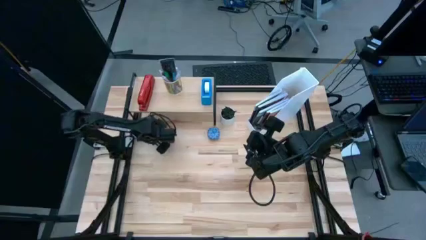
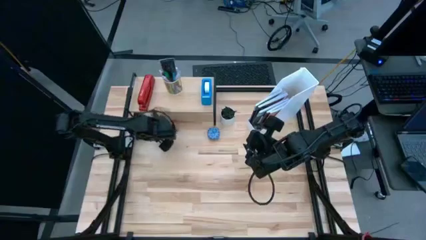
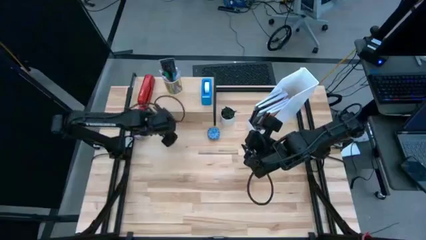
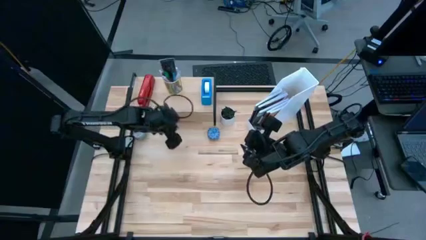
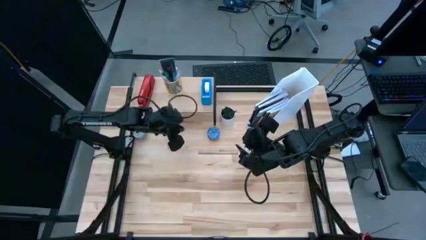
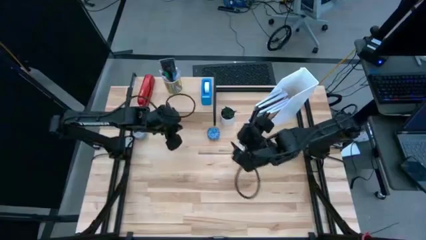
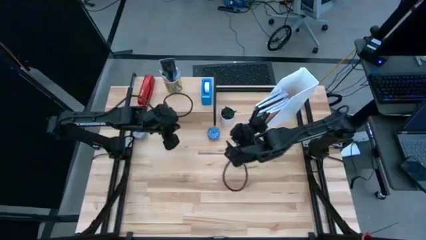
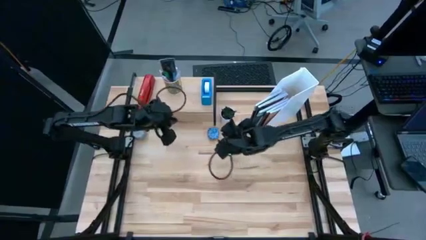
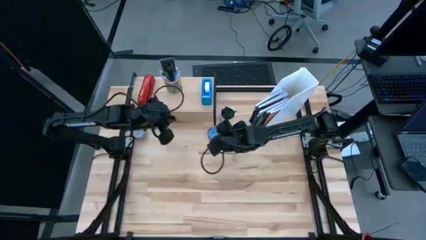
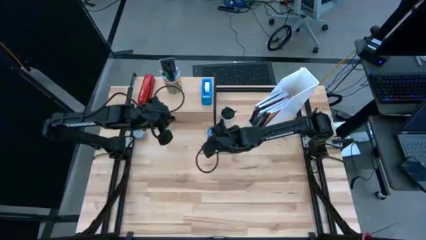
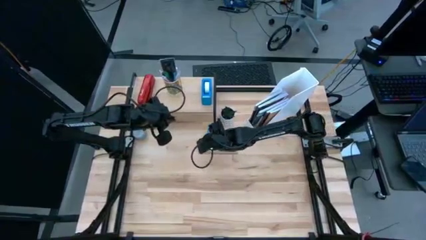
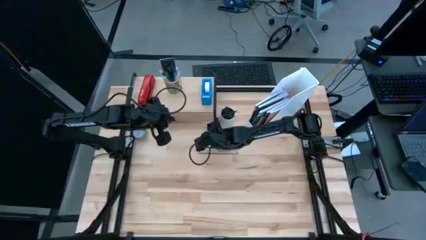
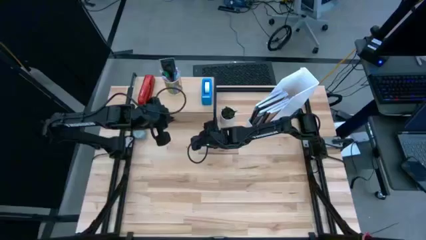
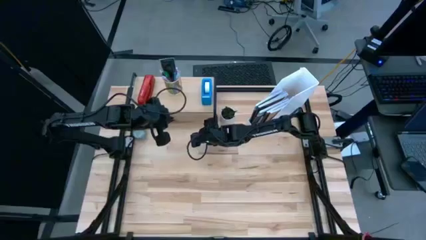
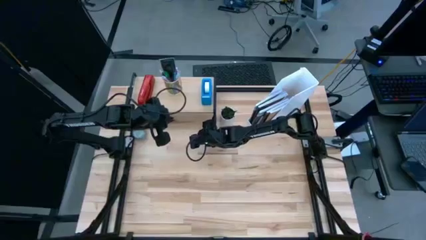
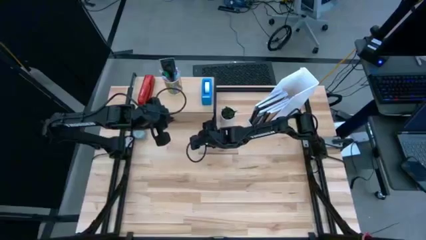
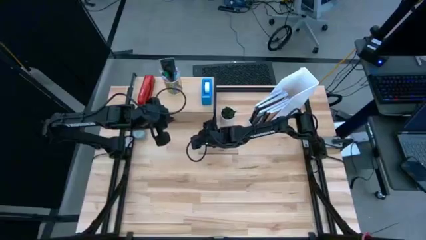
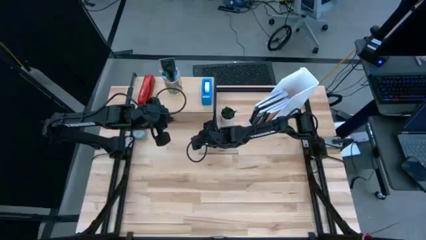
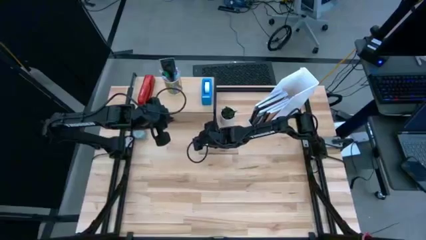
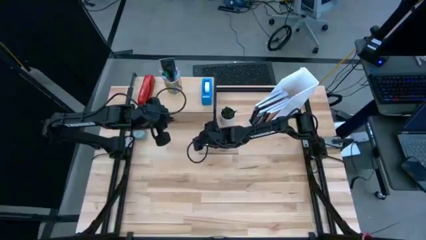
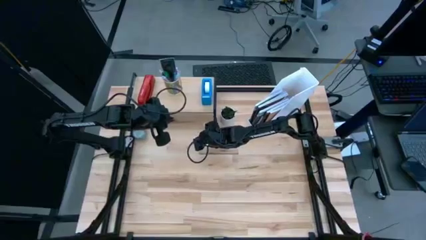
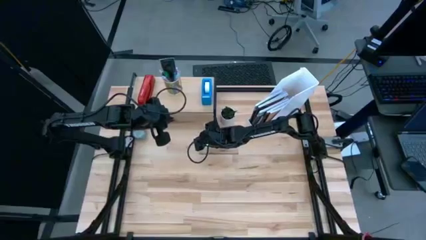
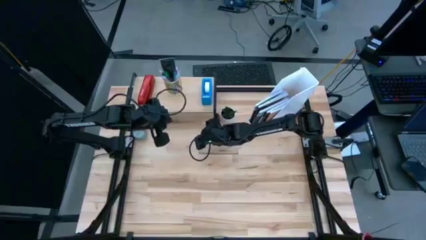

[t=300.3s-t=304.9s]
Task: Stock shelves
Adjust the blue scented candle

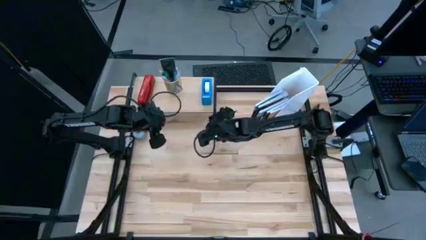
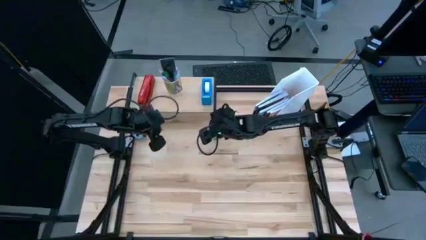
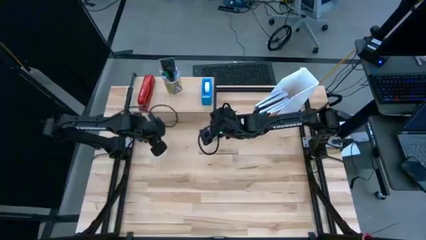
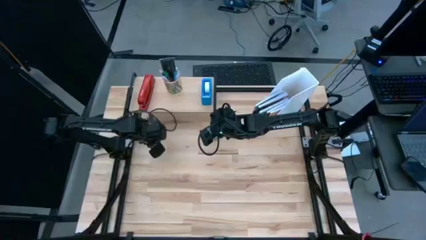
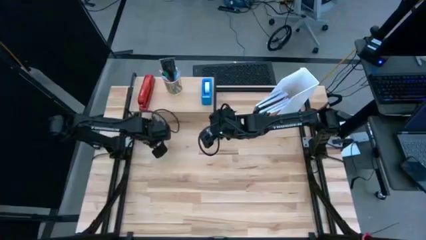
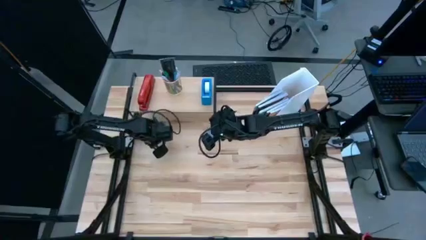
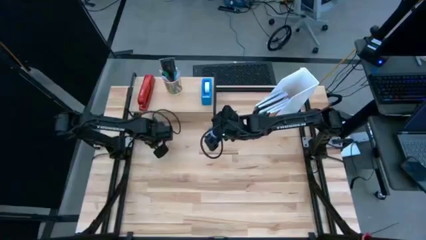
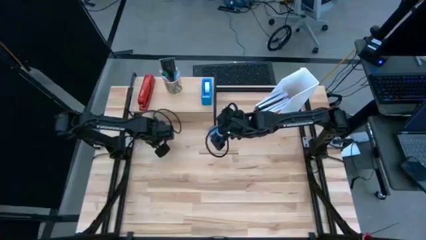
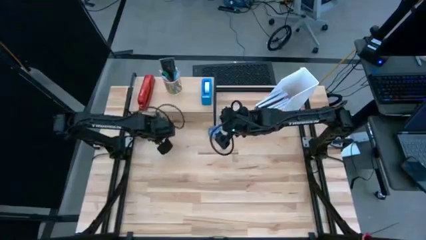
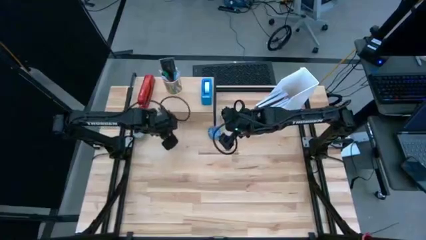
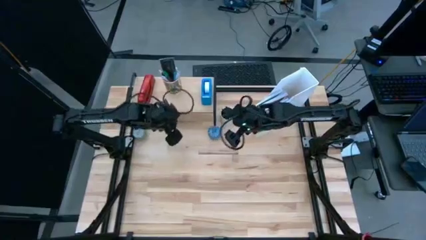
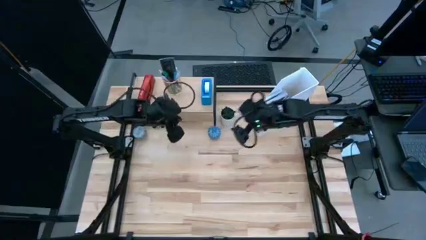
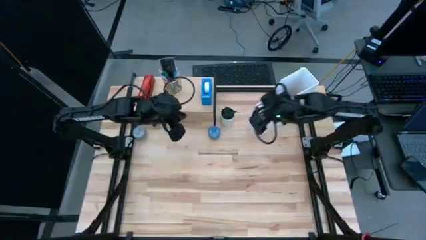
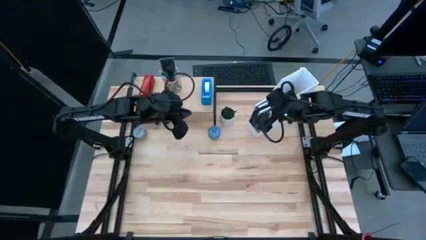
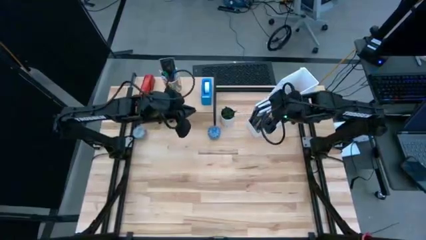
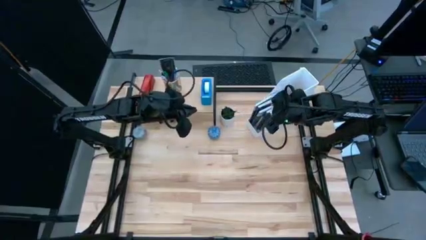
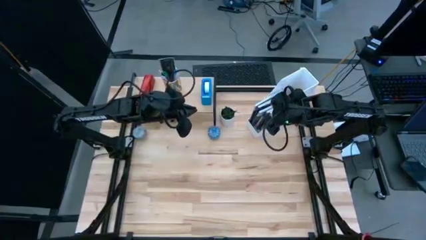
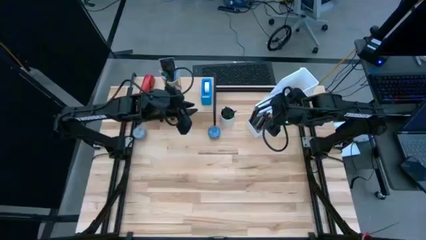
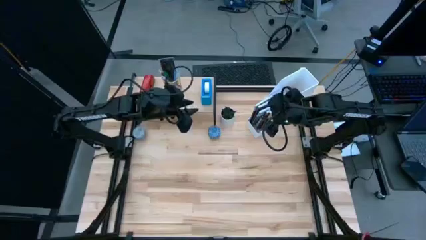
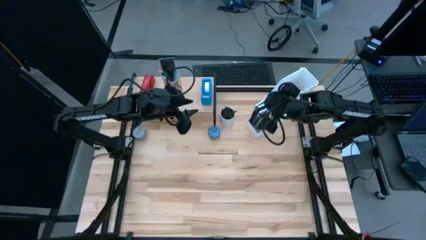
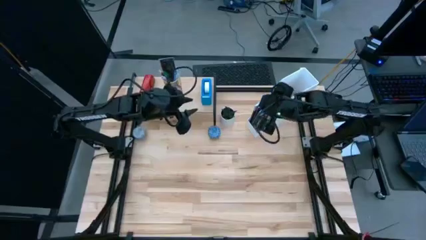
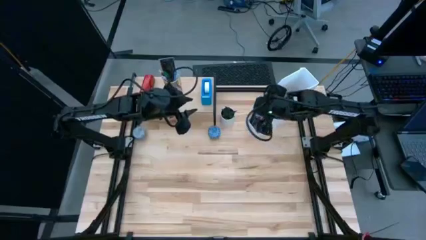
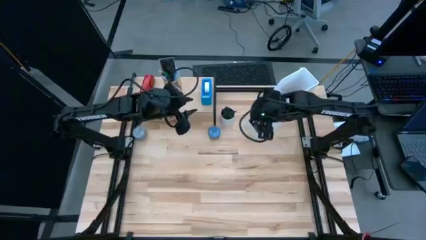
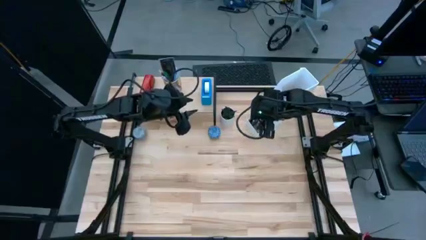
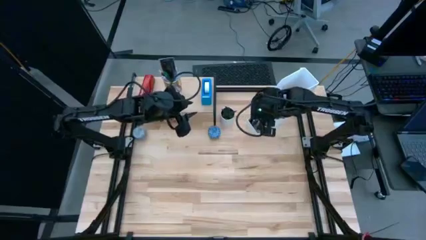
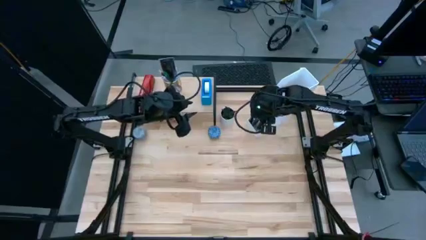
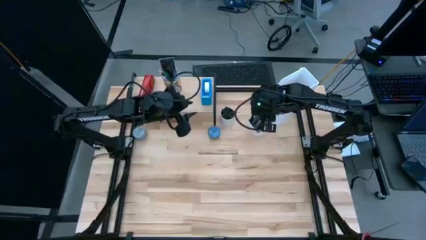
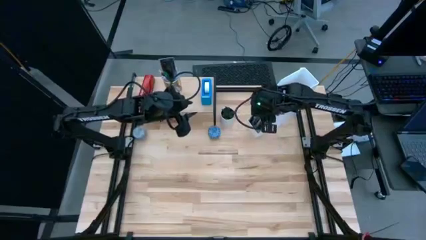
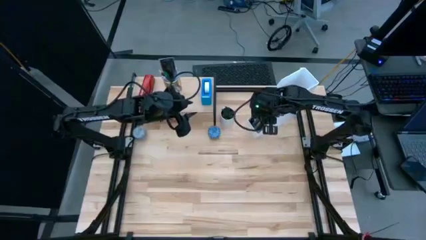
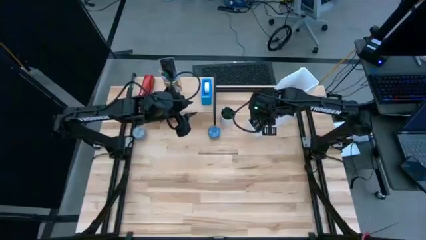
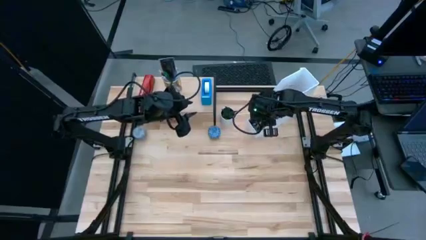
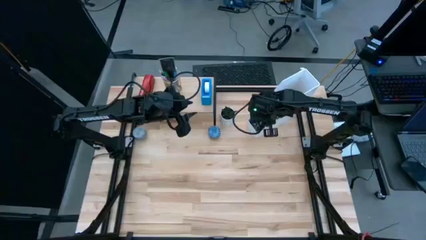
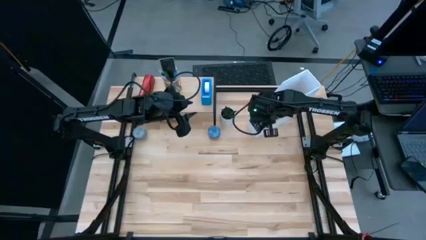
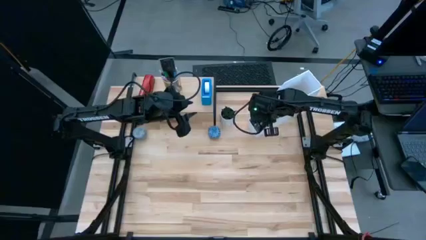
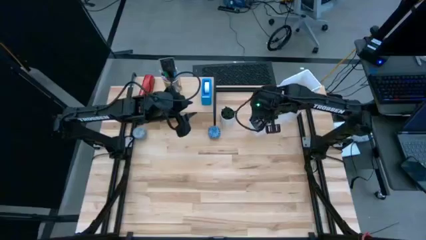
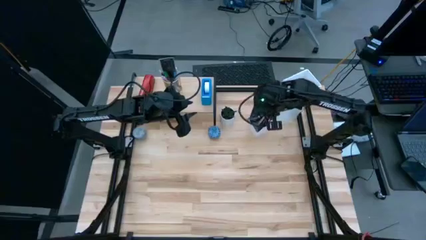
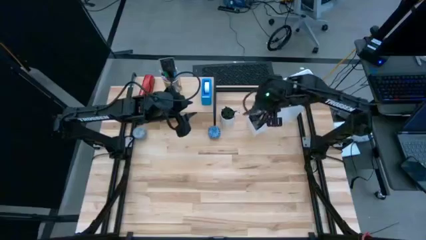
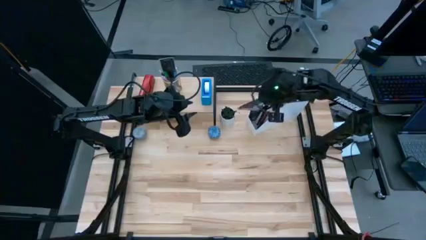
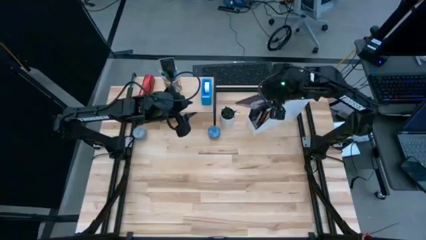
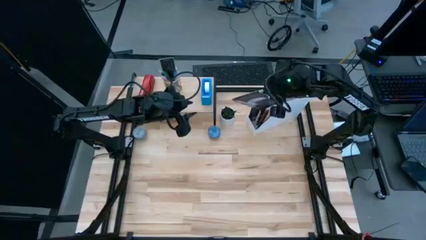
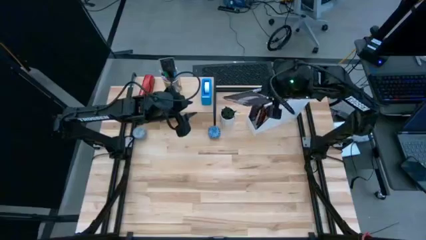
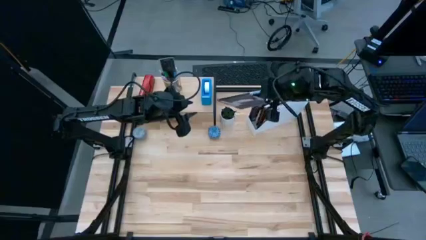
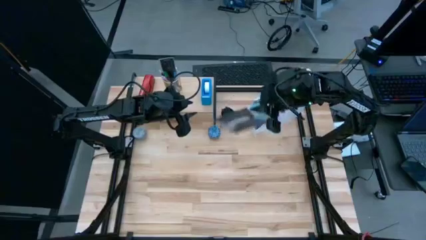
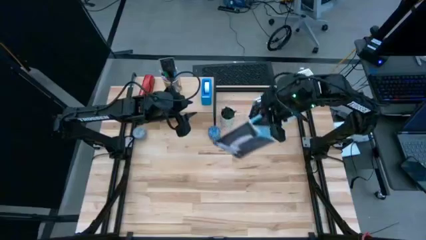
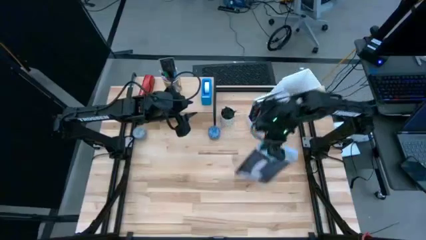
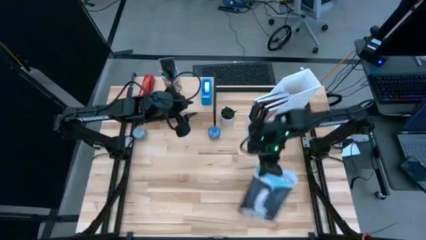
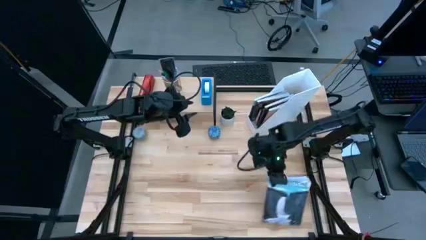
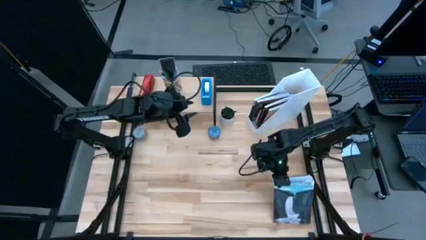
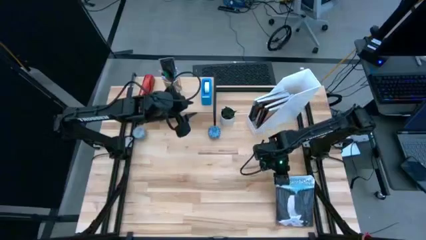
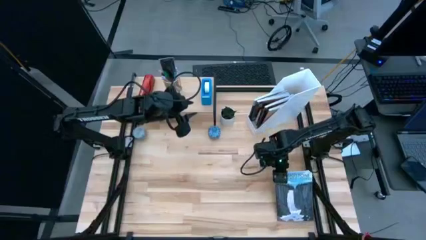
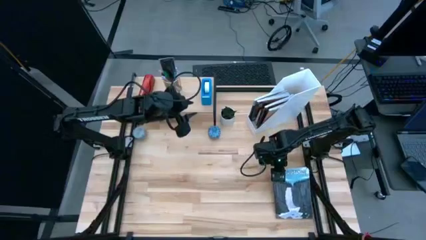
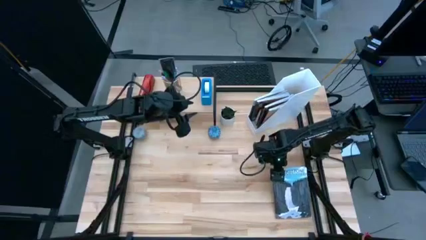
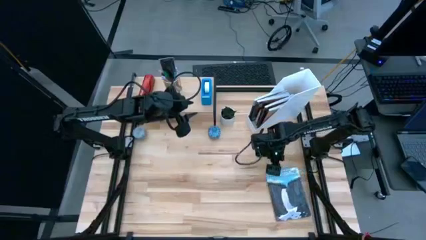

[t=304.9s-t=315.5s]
Remove the blue book from the white book shelf

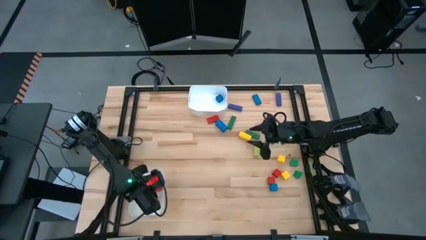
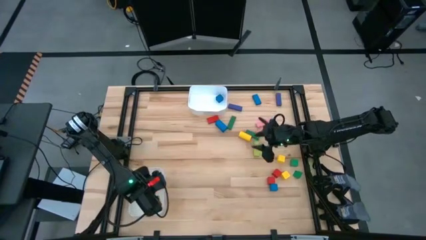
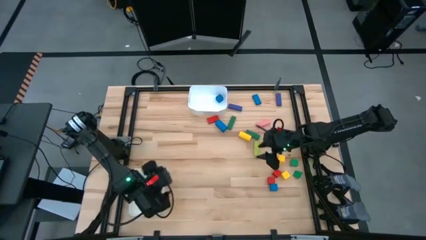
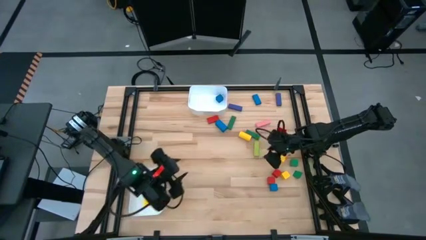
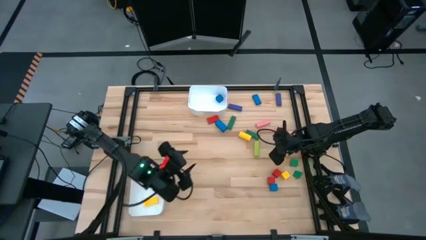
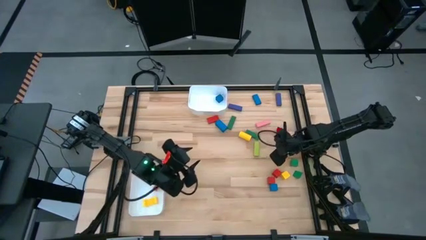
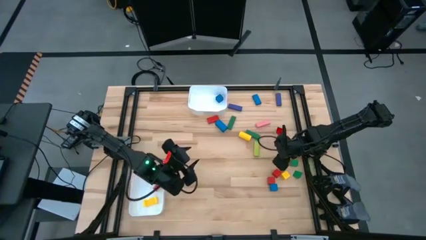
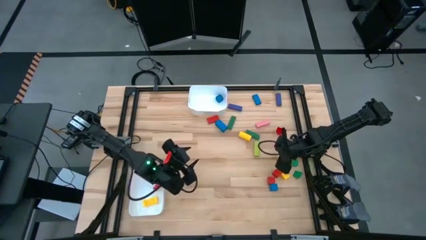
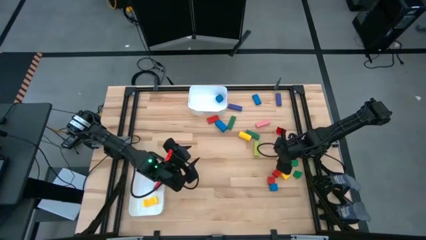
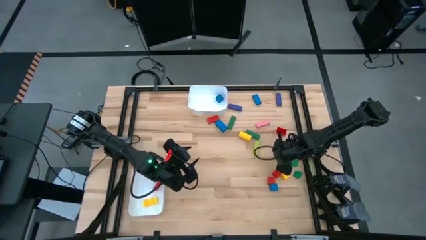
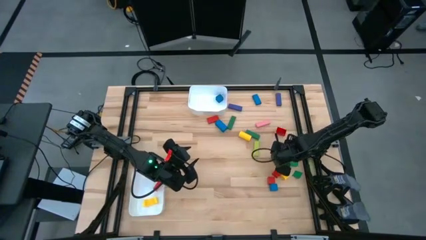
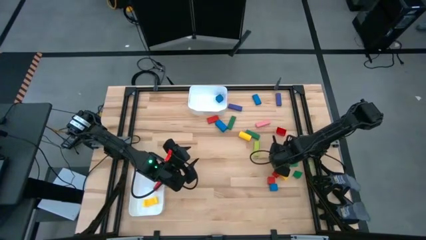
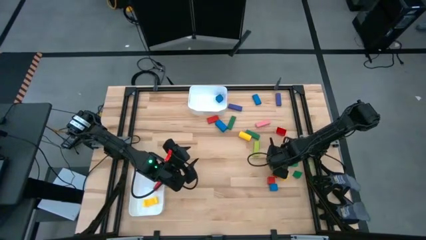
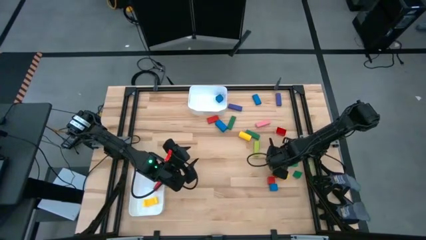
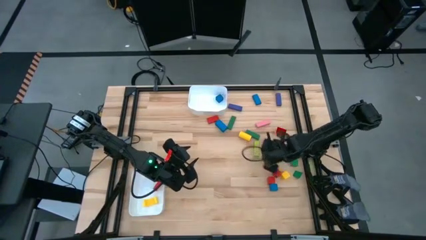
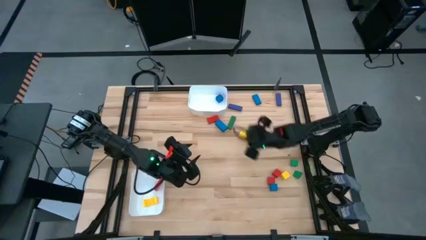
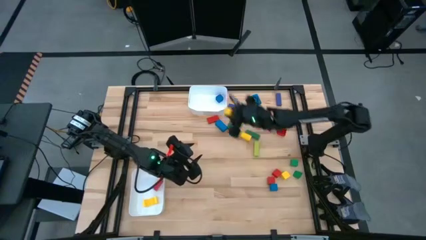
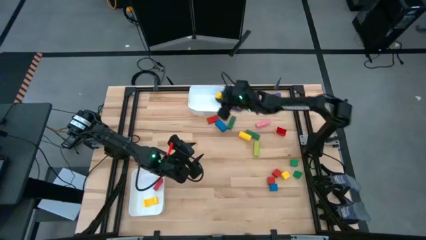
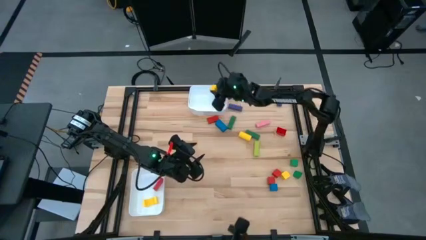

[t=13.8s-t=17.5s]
Task: Sort blocks by size
Put the yellow cube block into the top white bin
